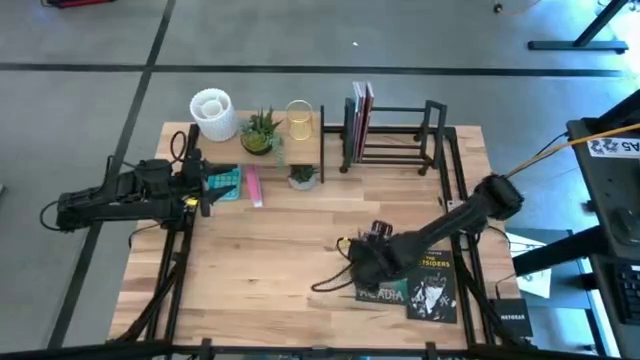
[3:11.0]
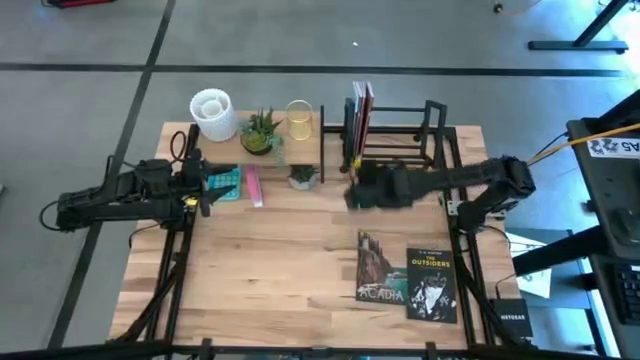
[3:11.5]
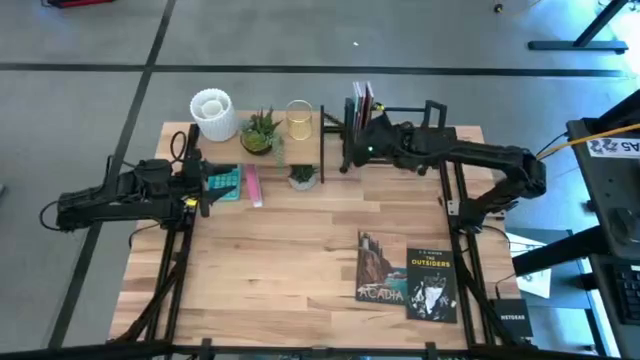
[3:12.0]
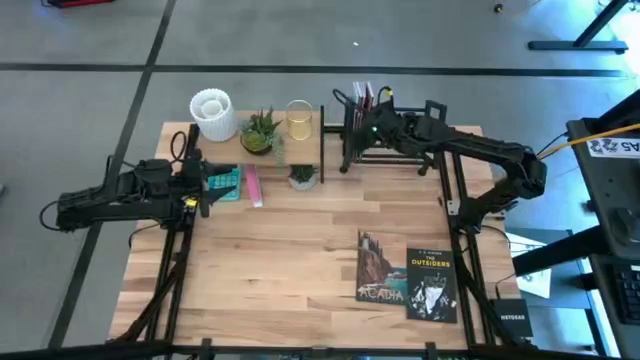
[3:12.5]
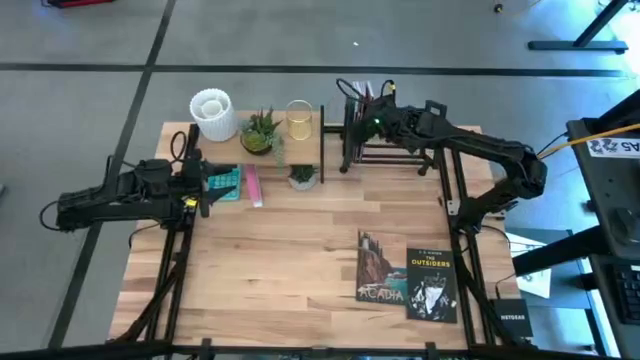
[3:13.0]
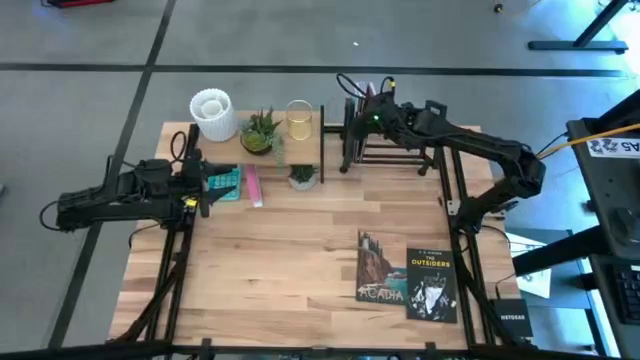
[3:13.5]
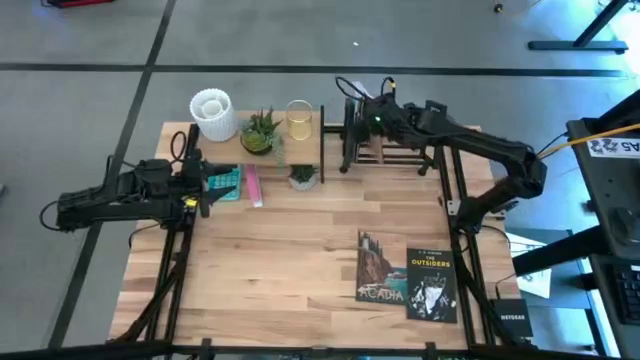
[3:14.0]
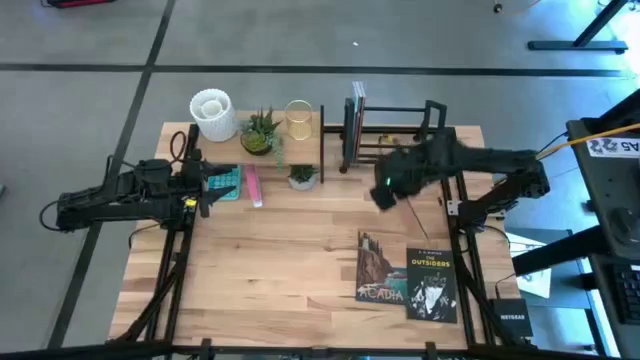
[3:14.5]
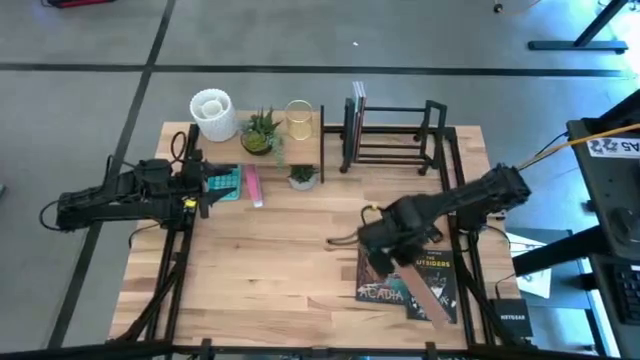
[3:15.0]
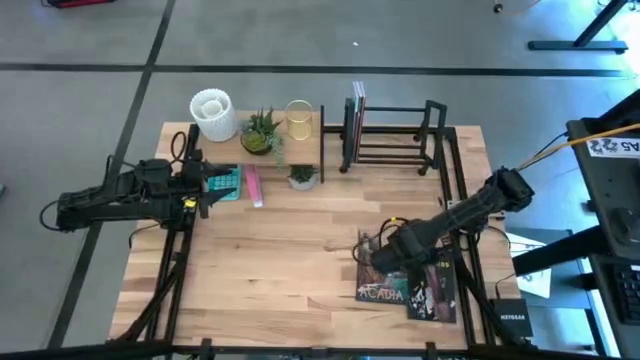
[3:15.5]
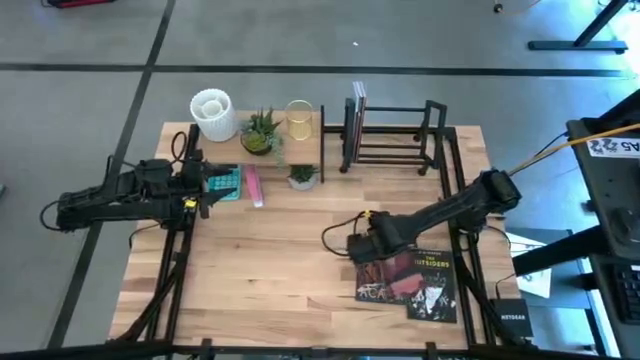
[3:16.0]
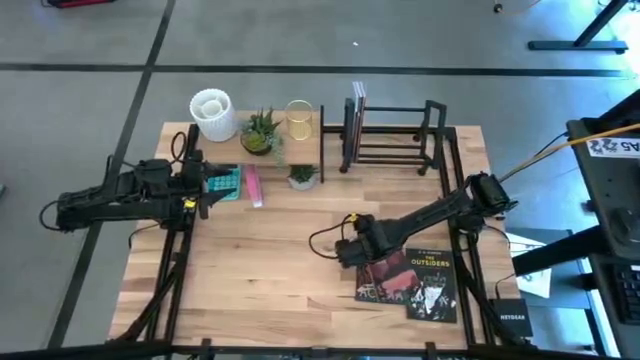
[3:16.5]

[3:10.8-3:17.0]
Task: Stock shelves
Remove the purple book from the bookshelf

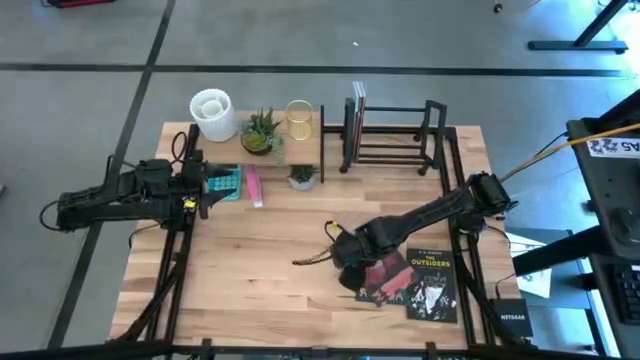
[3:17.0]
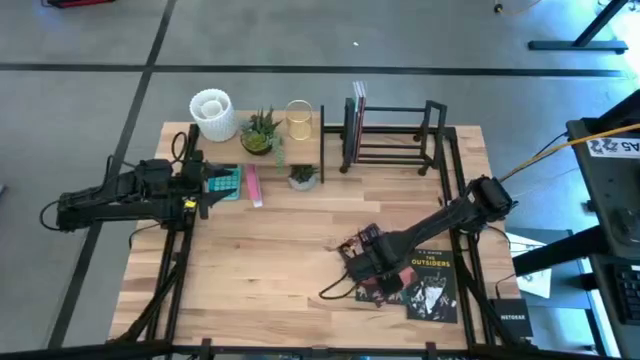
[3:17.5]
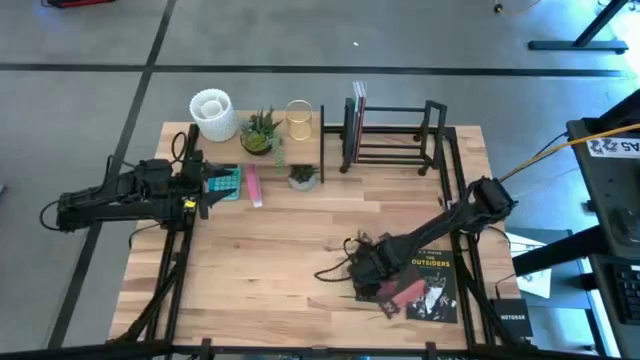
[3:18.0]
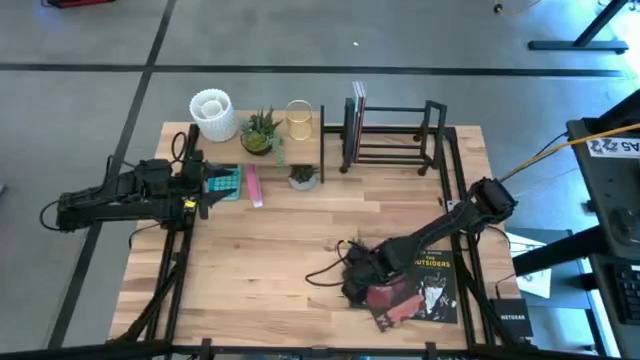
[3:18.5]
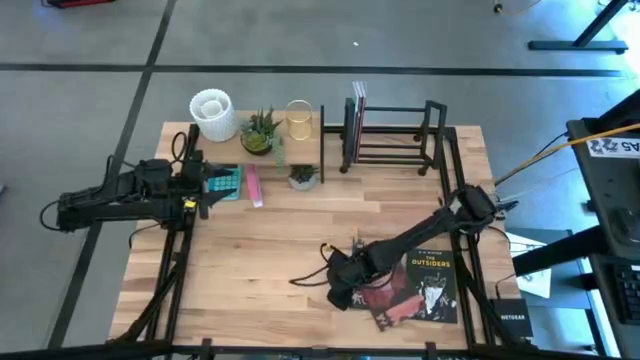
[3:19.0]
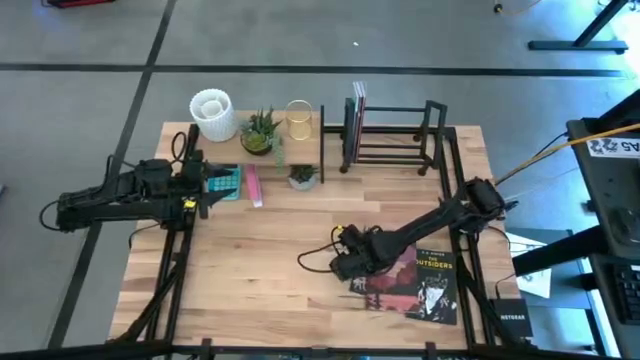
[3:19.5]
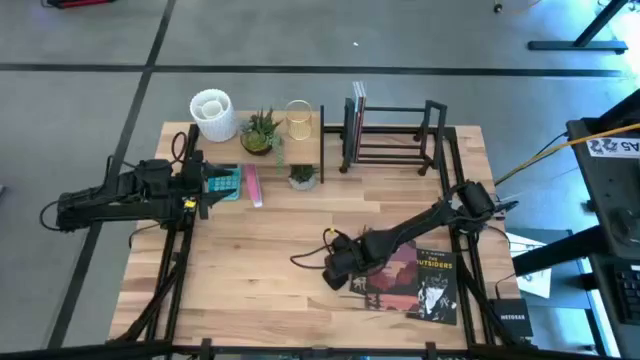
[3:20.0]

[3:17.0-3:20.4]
Adjust the stacked books on the table

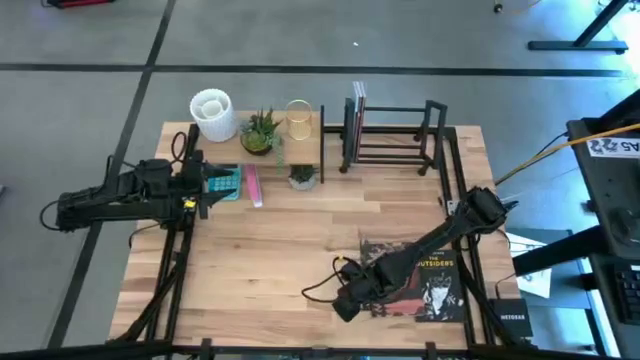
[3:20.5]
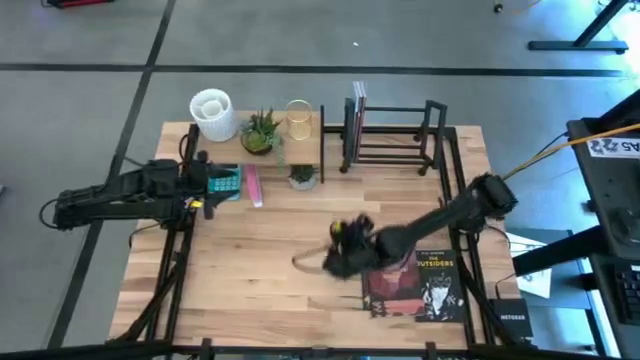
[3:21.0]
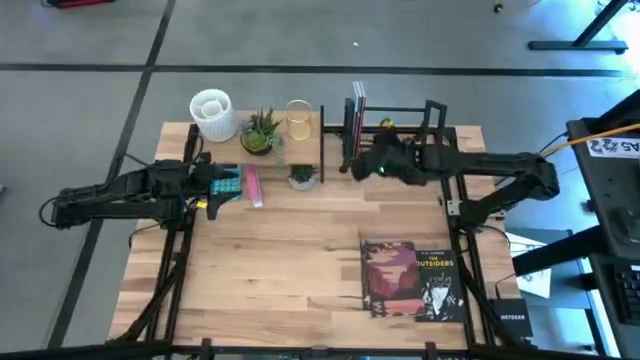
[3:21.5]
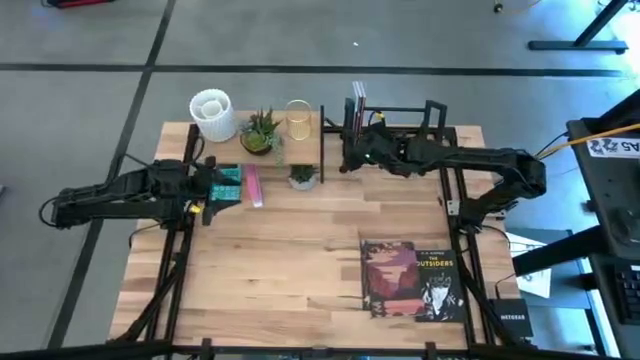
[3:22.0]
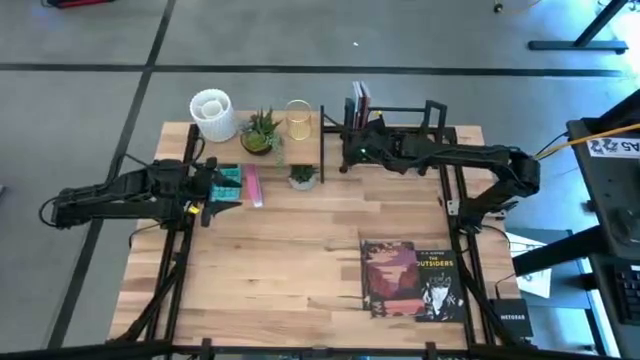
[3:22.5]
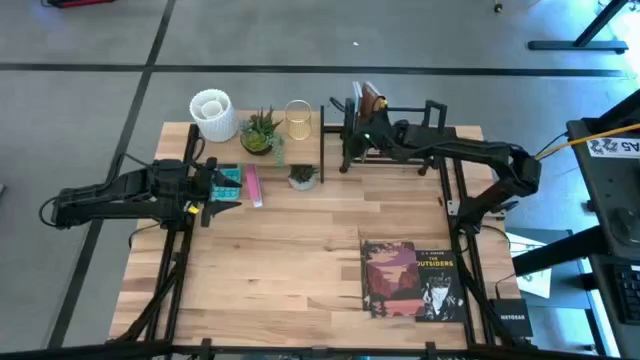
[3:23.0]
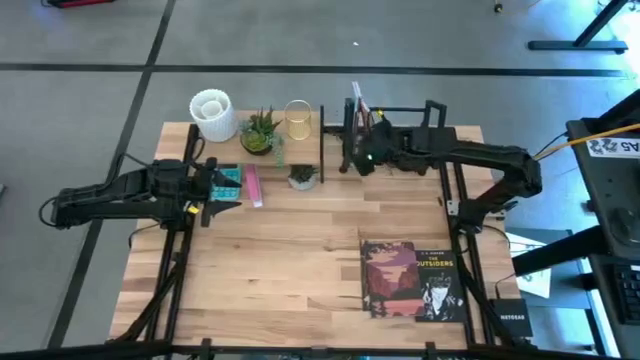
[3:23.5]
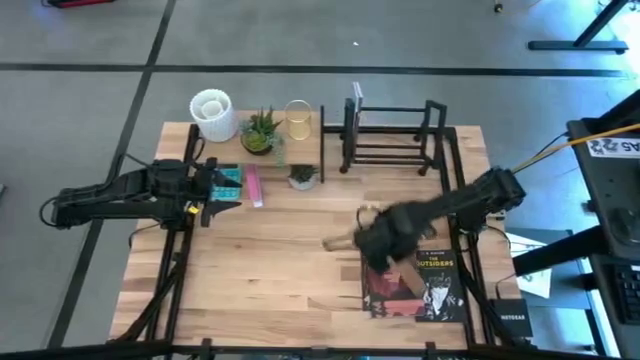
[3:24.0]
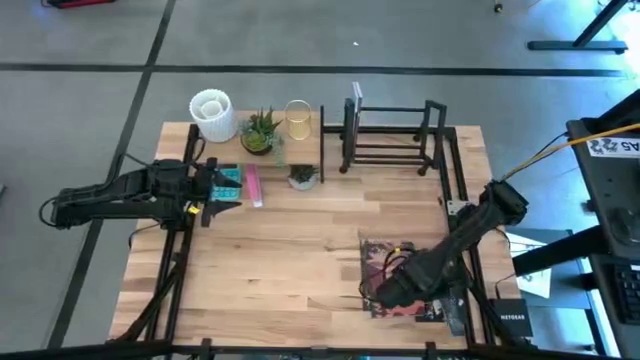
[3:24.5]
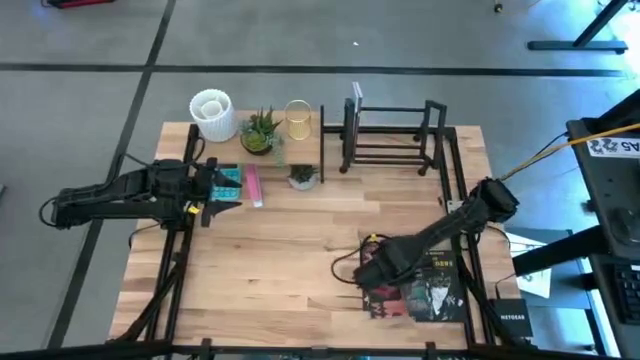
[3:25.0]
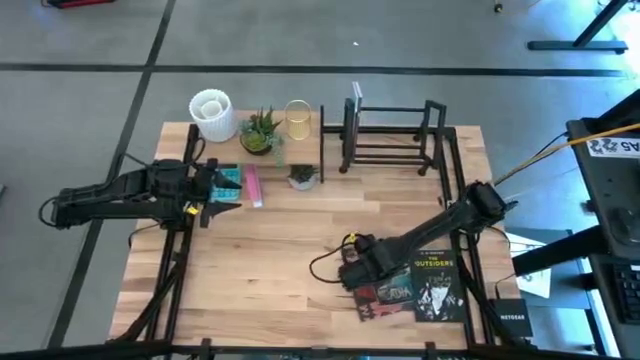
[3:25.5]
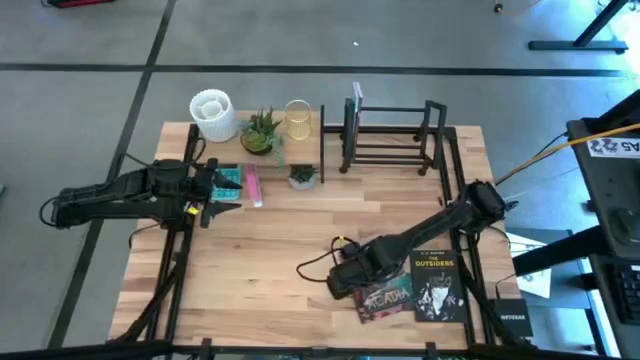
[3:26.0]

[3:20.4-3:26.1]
Remove the brown book from the bookshelf

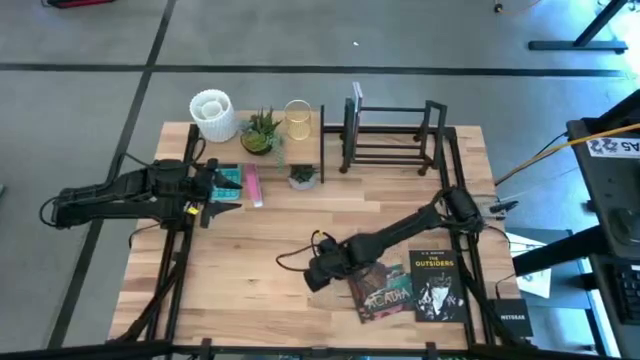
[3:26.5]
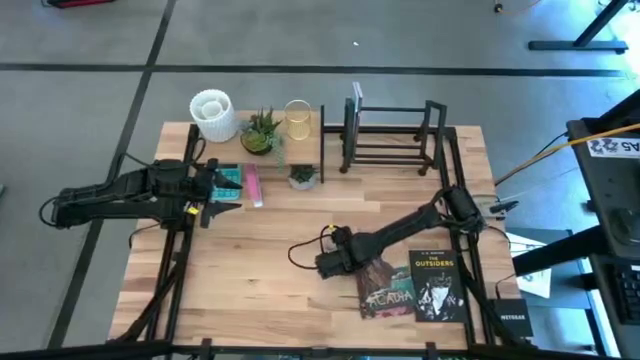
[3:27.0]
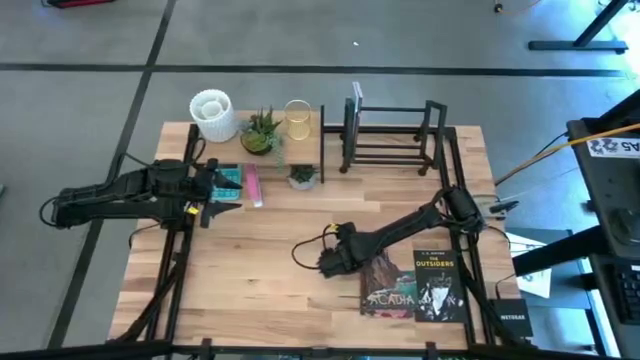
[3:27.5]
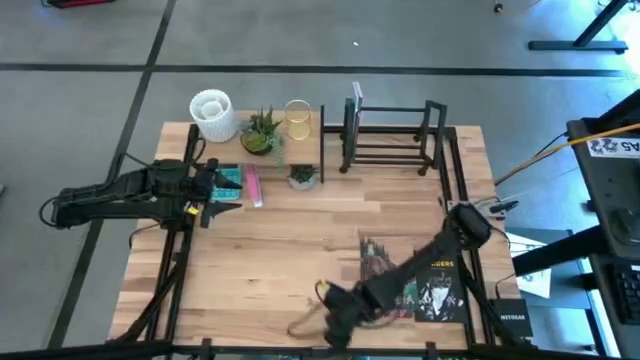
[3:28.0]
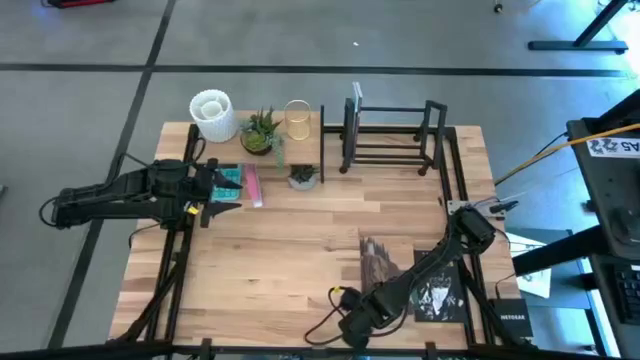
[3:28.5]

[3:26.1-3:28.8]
Adjust the stacked books on the table

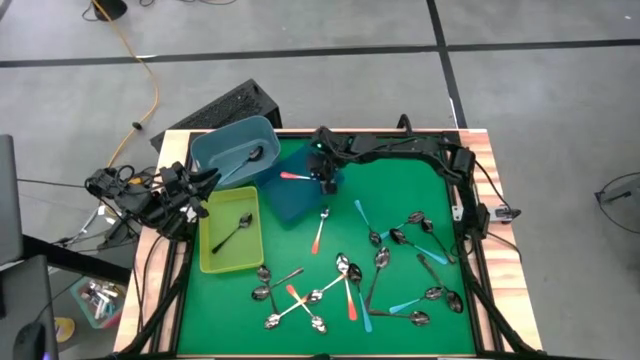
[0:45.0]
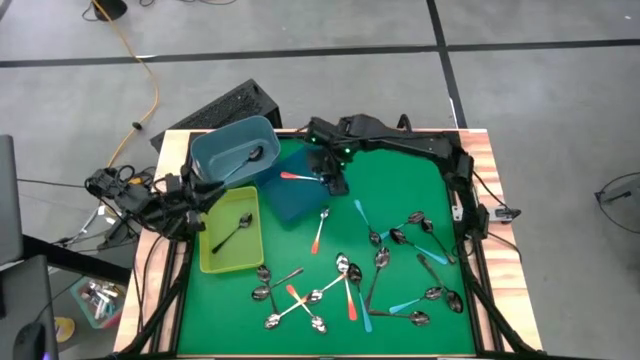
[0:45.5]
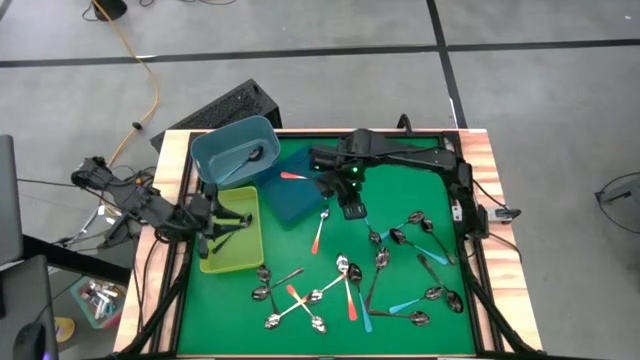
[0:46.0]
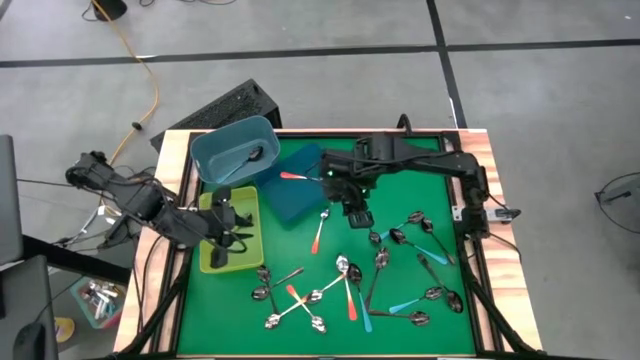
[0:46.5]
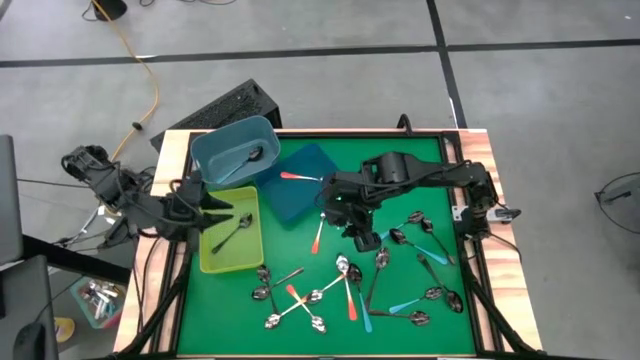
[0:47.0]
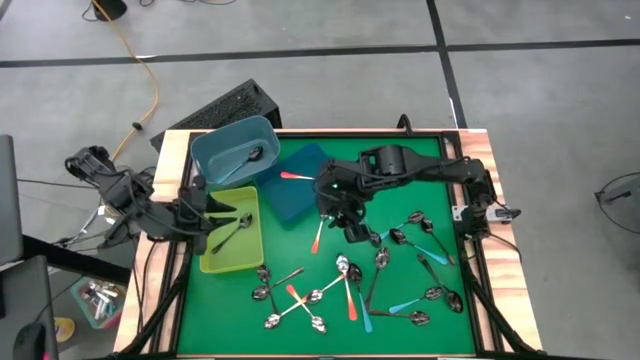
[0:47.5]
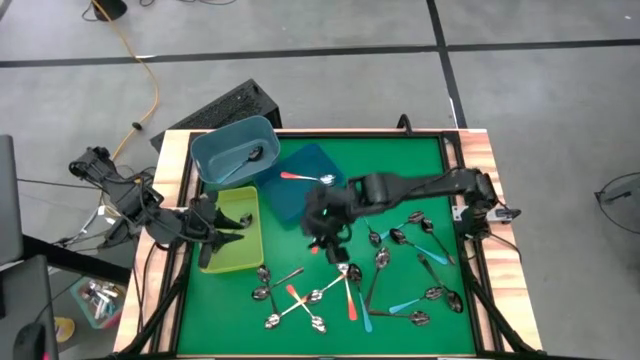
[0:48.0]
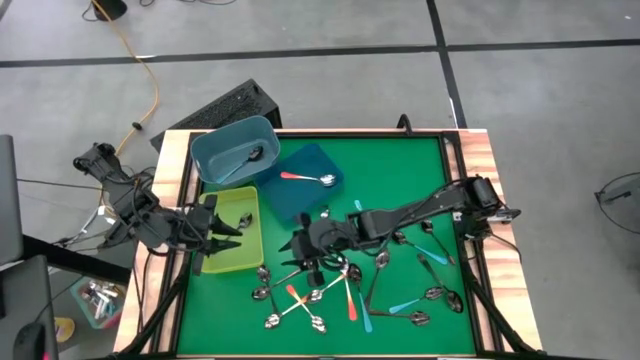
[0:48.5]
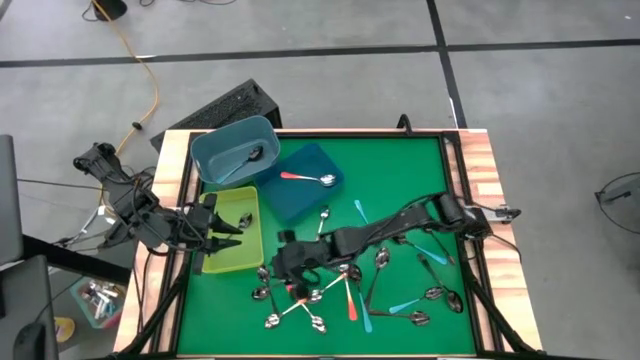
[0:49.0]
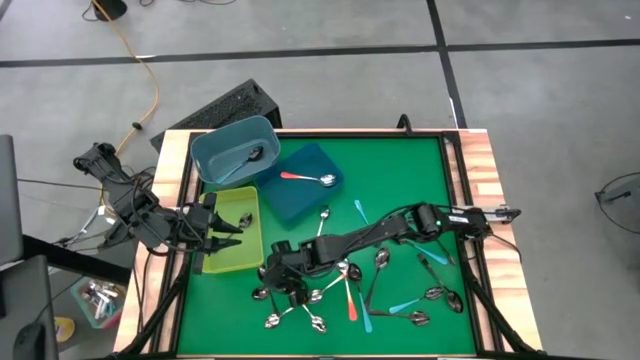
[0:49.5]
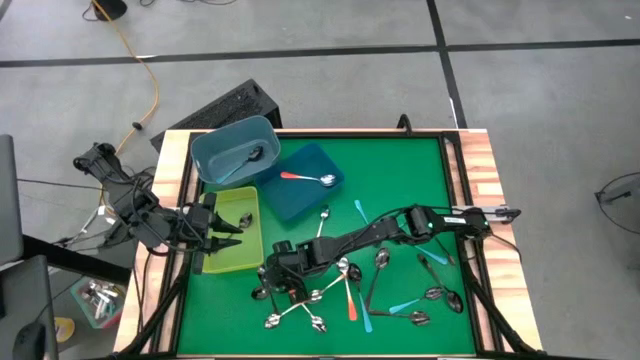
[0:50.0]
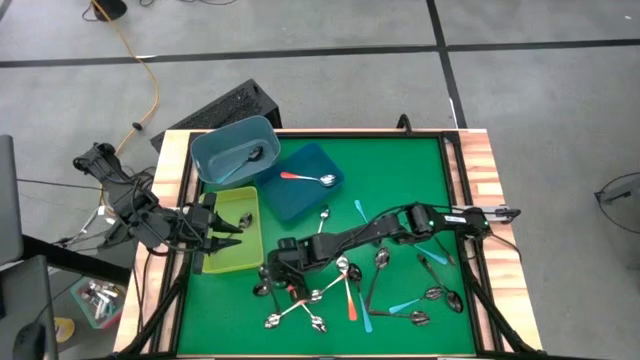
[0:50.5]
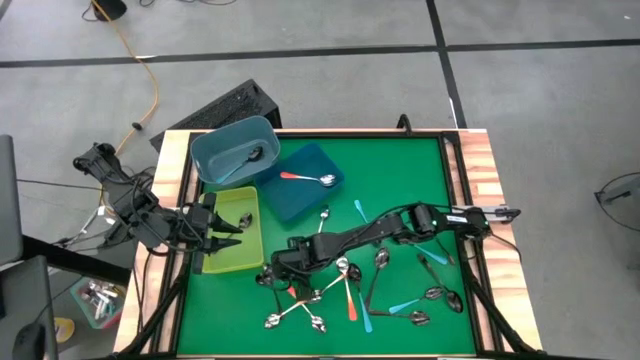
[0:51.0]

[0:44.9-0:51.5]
Task: Sort silverware by color (type)
Put the black spoon into the green bin
